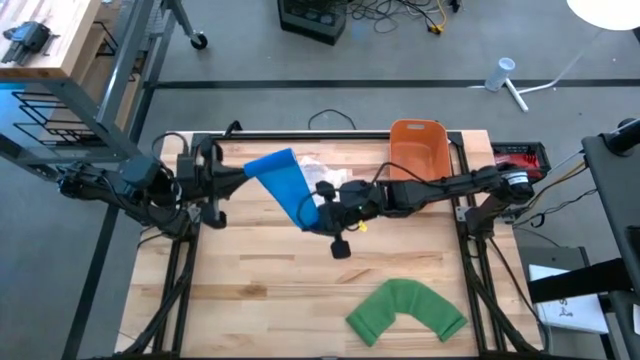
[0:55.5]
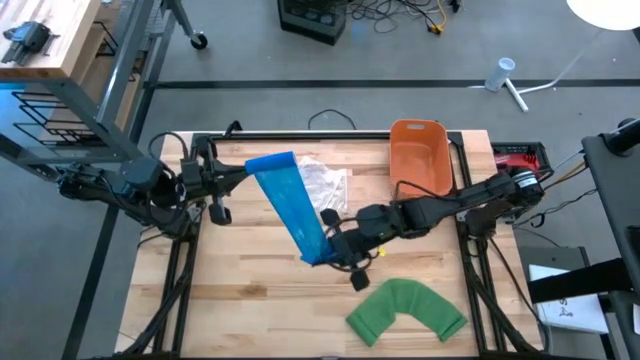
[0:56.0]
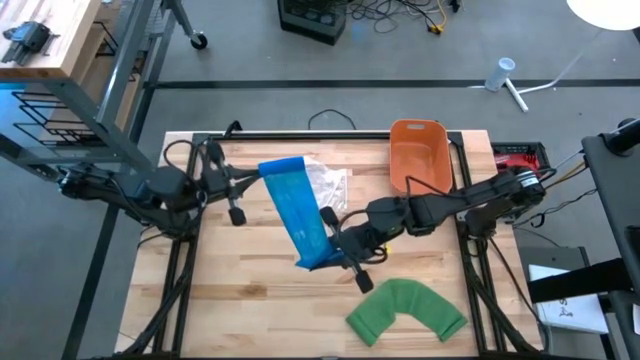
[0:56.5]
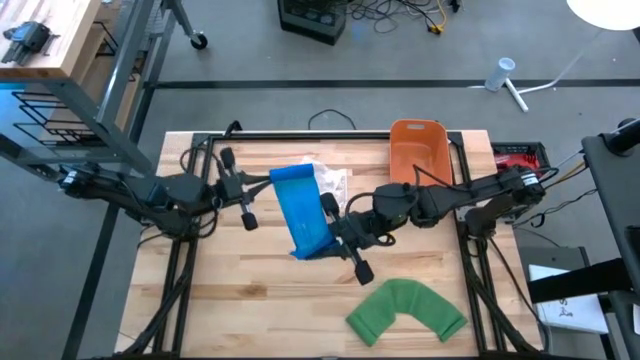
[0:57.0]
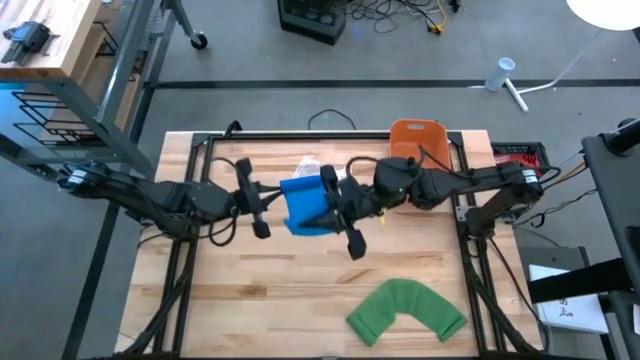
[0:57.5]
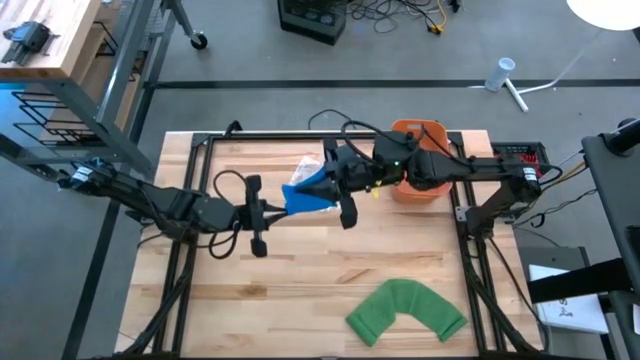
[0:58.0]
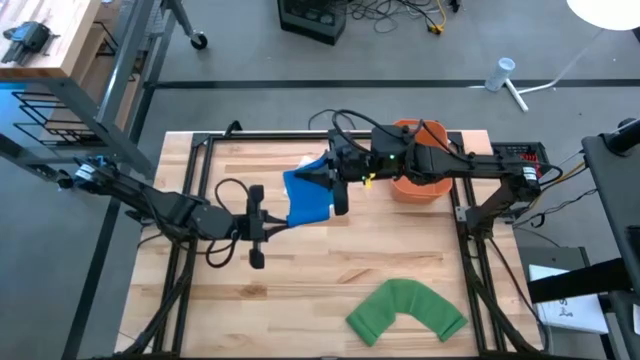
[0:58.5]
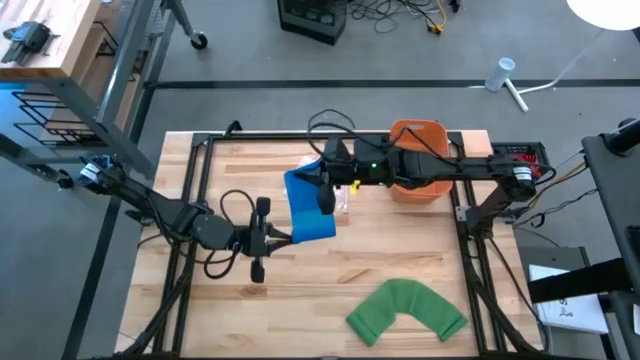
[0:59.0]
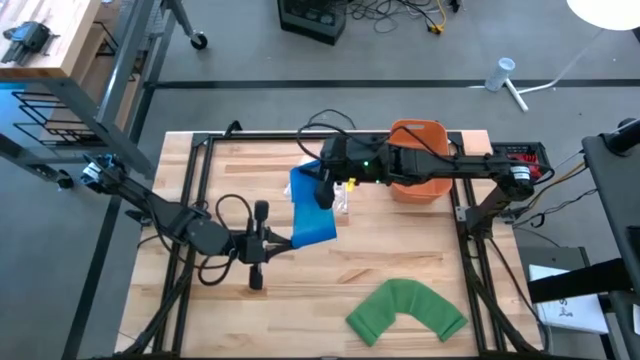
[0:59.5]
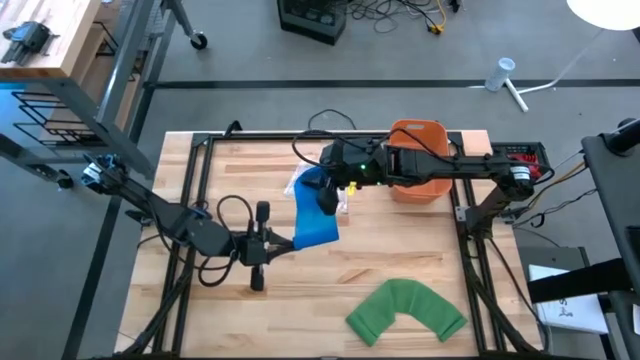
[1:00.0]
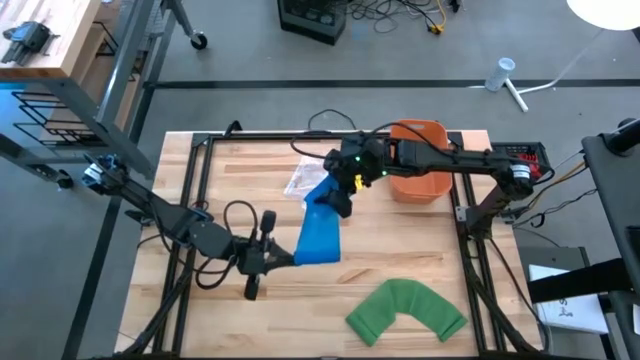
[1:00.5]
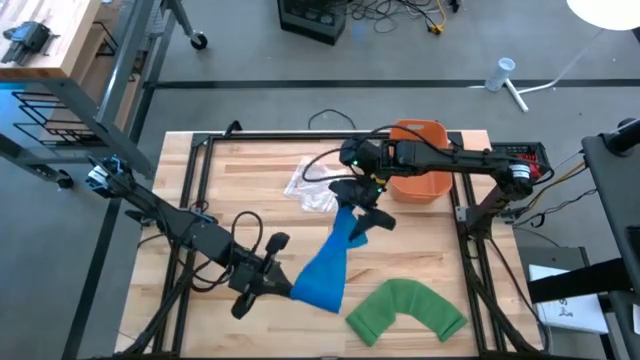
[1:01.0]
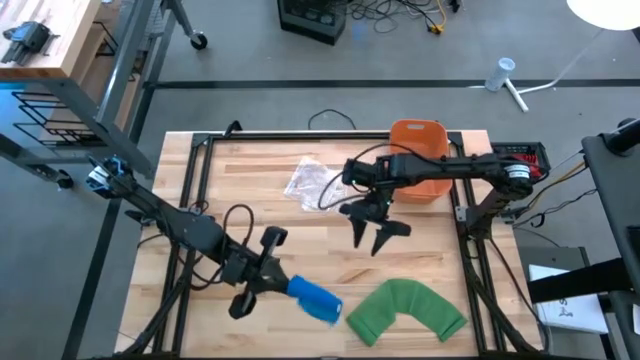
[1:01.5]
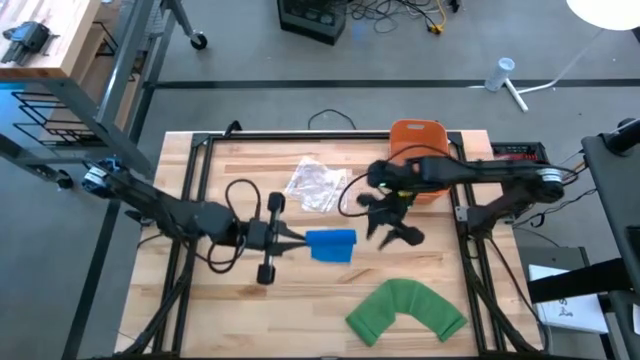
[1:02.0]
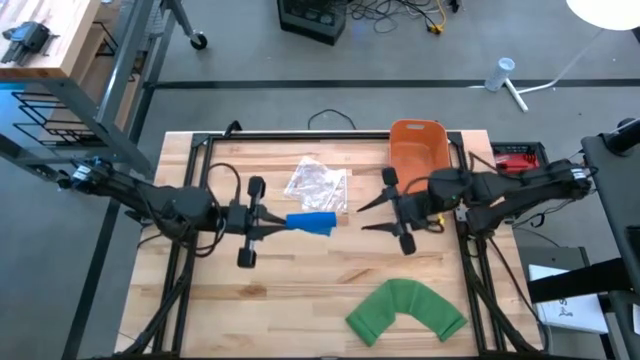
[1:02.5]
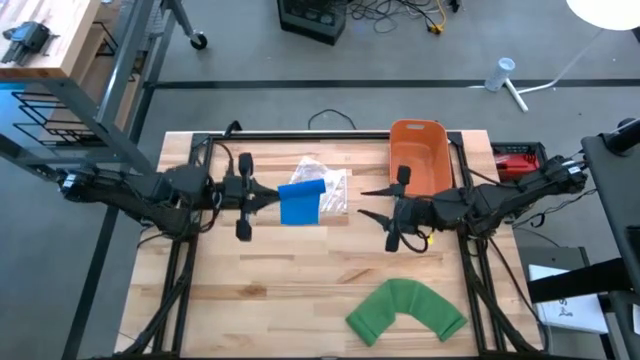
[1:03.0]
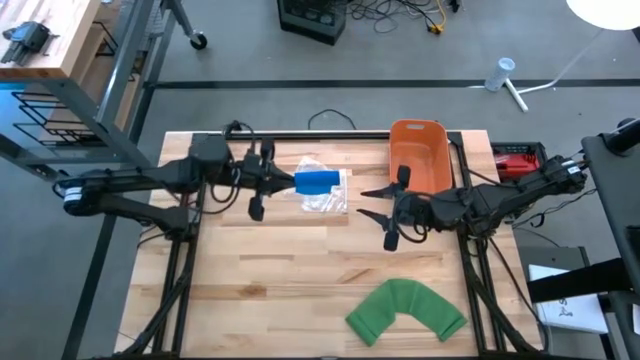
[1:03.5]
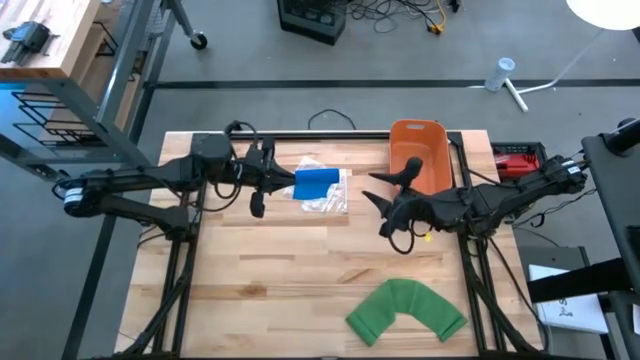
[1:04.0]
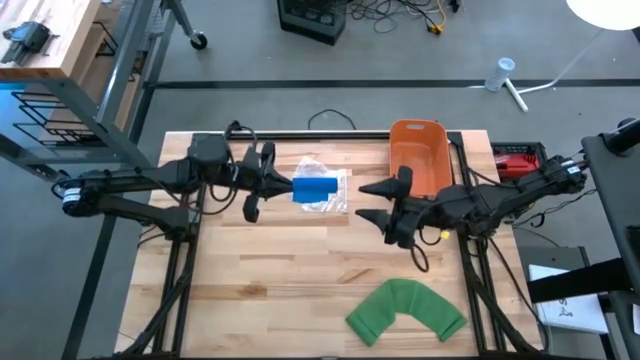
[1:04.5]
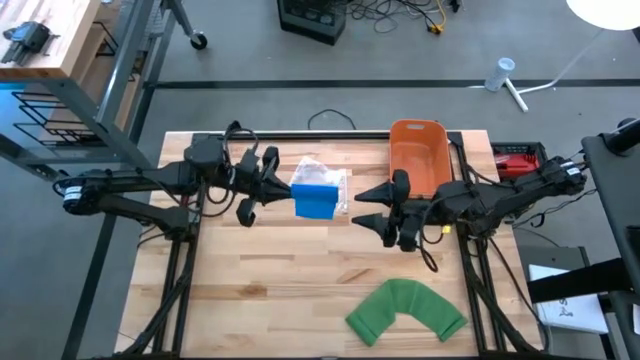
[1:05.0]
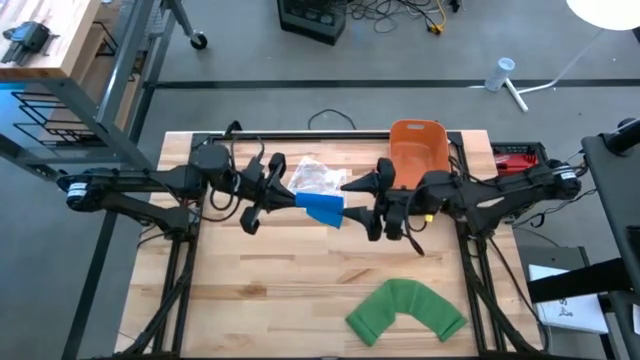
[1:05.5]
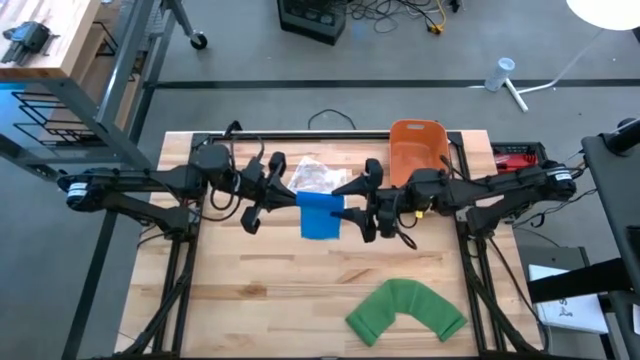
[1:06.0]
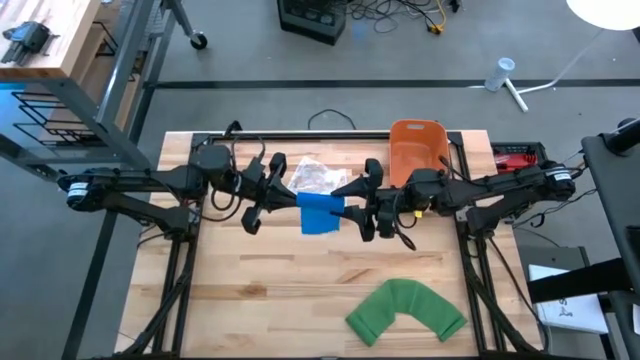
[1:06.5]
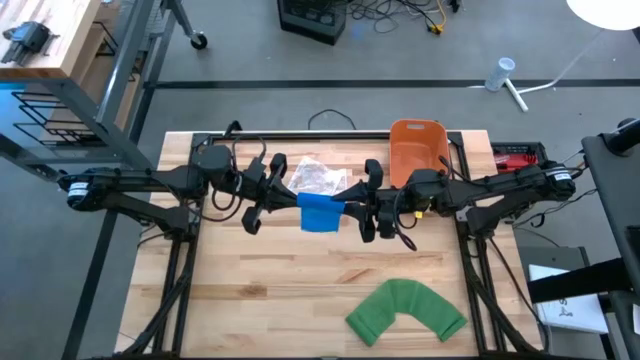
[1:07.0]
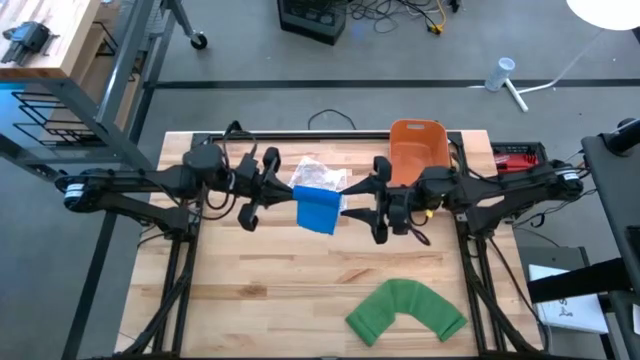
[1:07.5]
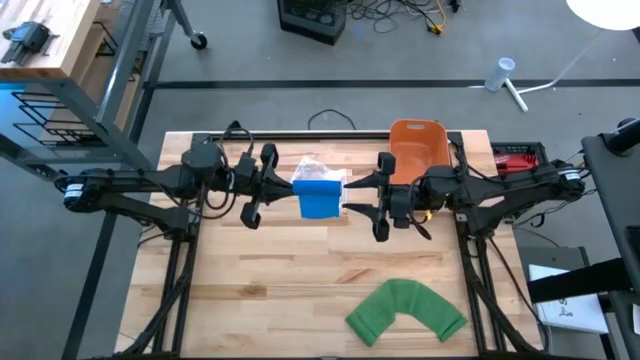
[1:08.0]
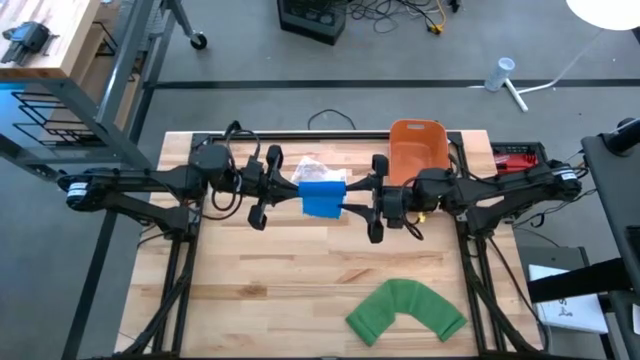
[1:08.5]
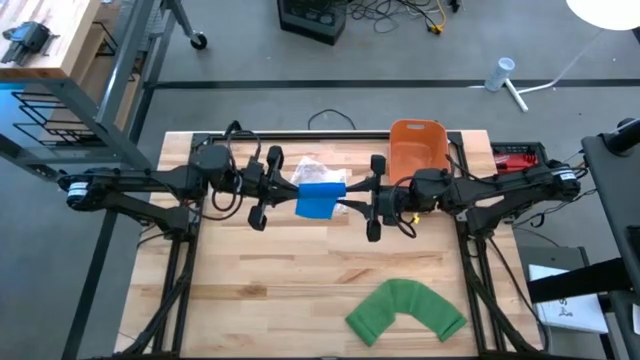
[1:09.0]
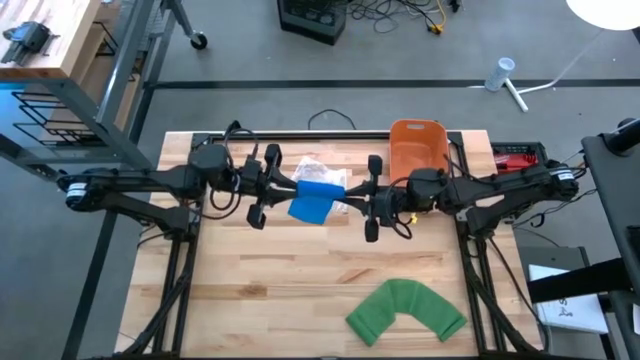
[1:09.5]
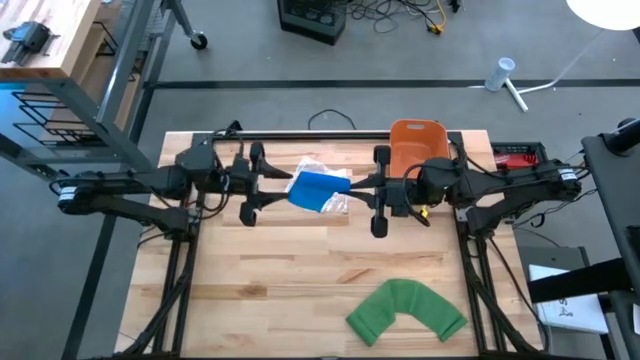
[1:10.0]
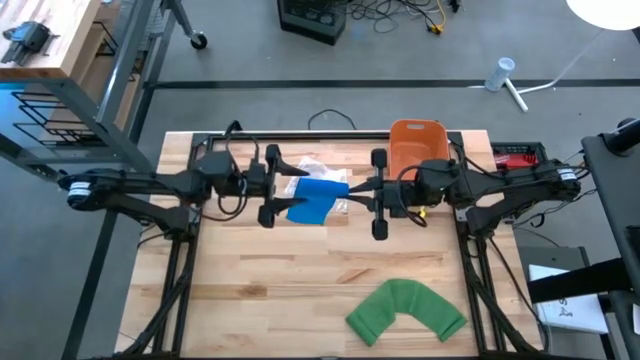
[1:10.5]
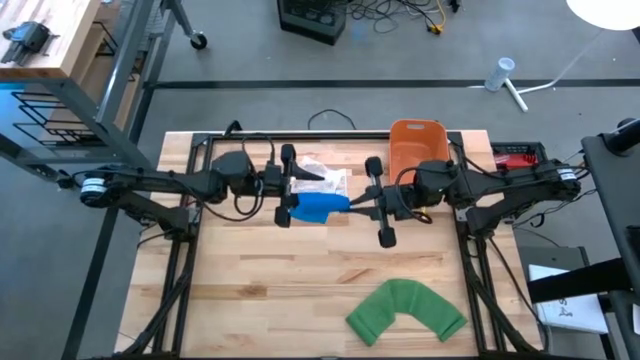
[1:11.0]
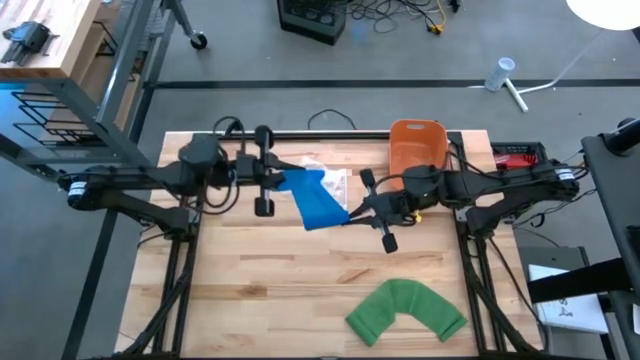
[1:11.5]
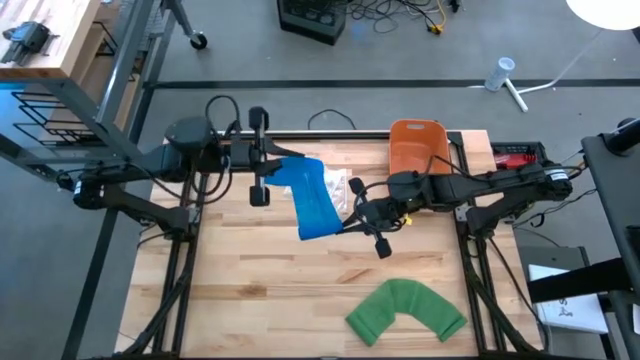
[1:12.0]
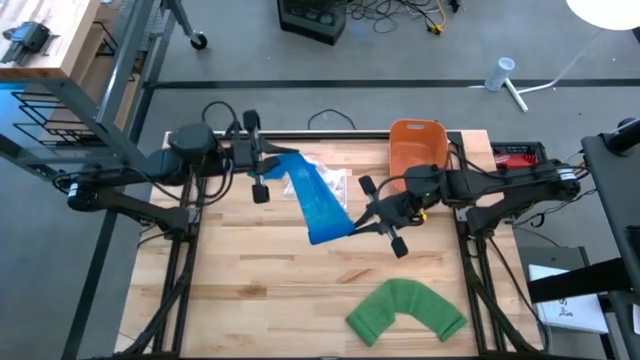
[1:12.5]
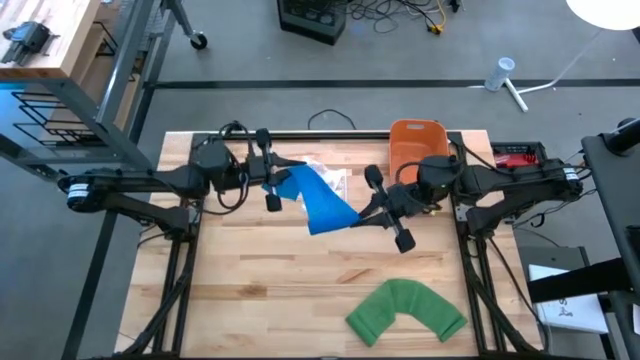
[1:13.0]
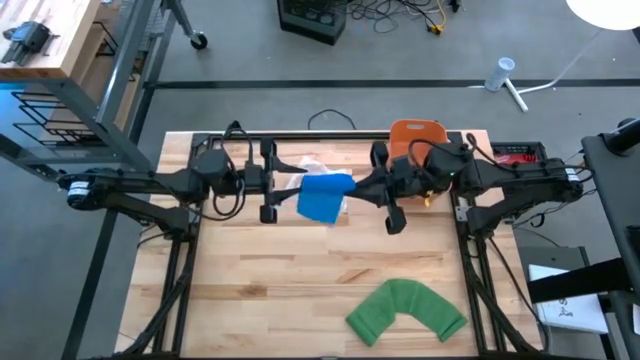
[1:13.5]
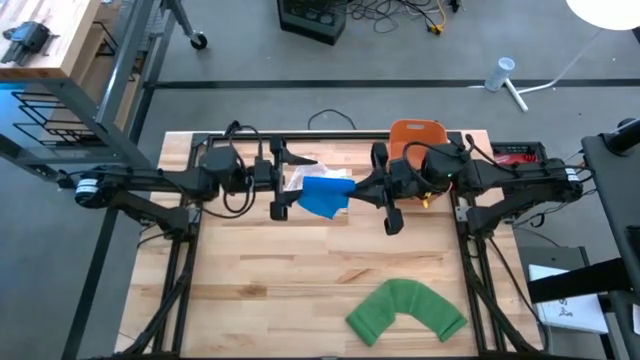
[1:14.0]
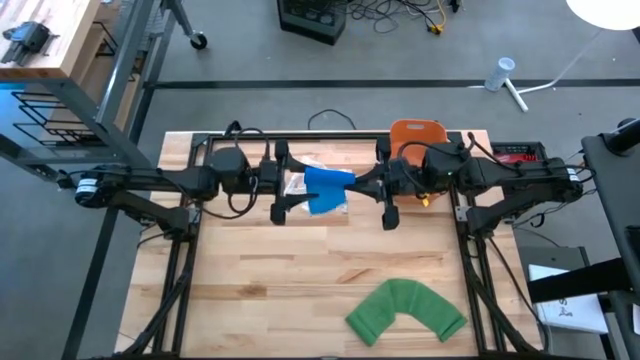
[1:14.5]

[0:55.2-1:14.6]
Task: Roll bandage
Roll the blue bandage

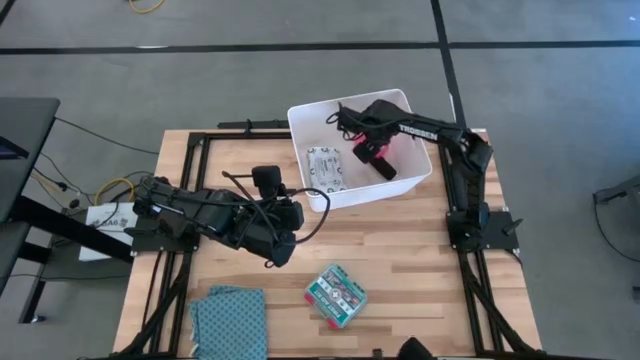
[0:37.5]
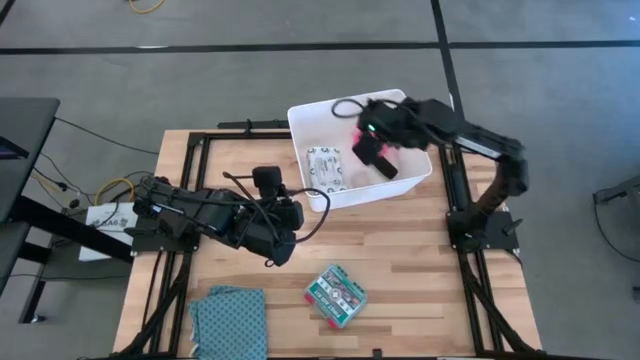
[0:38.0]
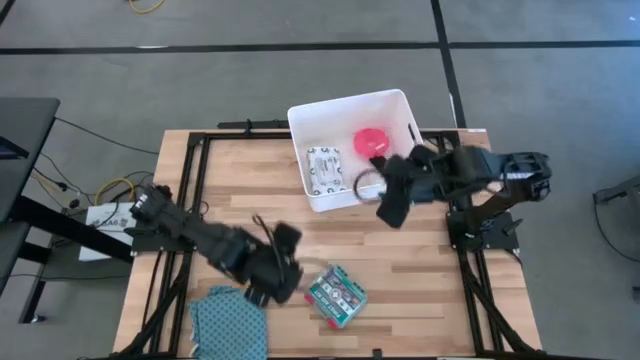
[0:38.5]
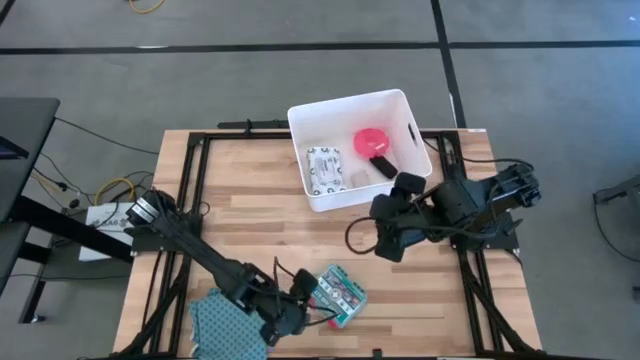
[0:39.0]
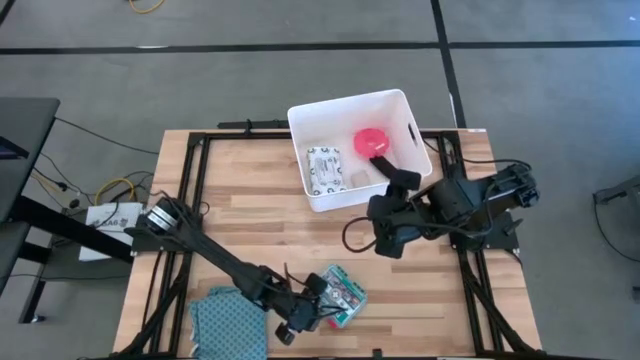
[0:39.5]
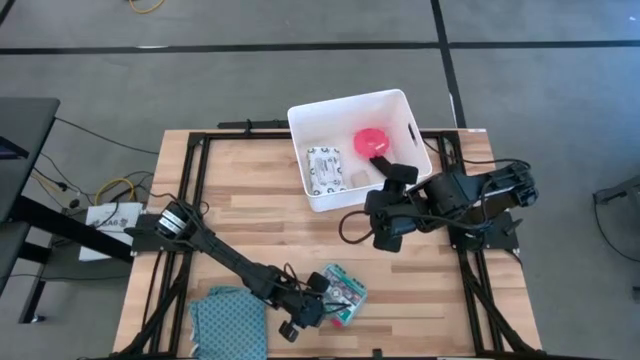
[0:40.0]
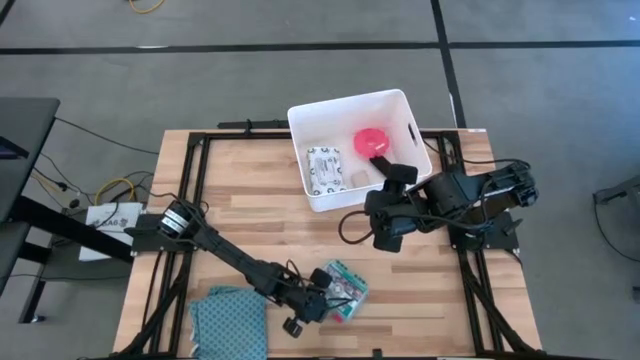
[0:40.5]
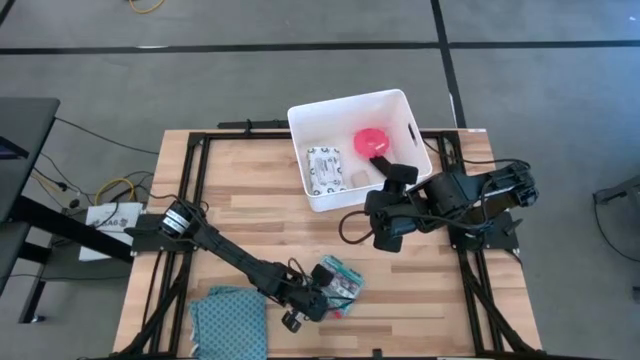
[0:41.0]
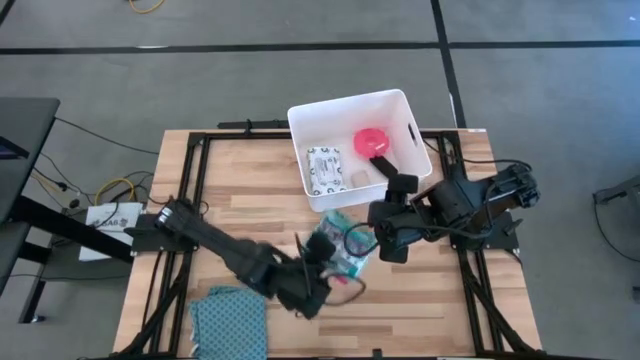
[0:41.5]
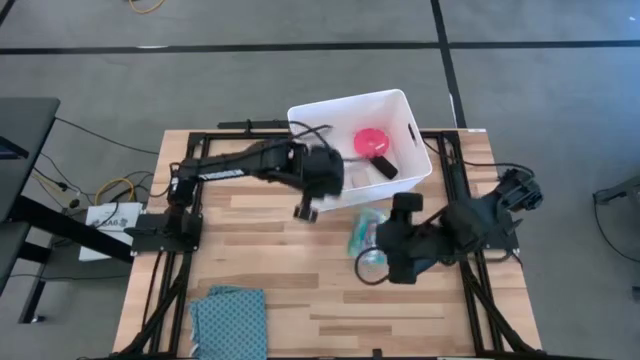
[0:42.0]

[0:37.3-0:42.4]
Task: Pick & place medical supplies in basket/bin
Put the green first aid kit into the white bin
